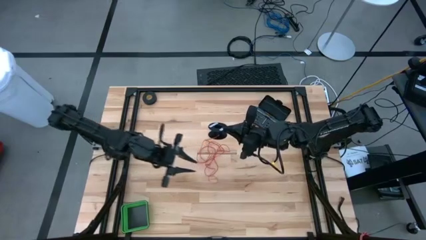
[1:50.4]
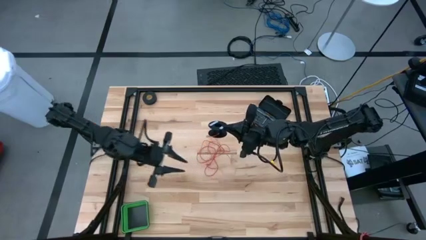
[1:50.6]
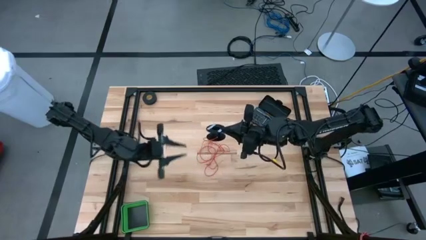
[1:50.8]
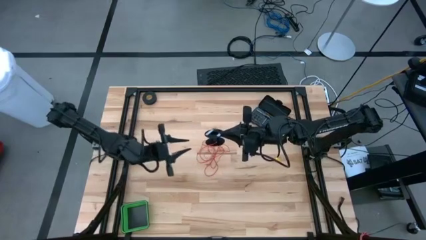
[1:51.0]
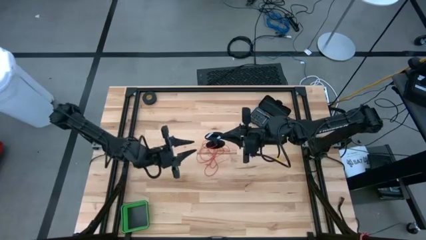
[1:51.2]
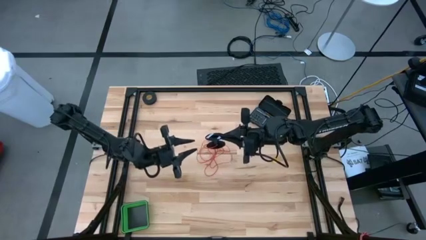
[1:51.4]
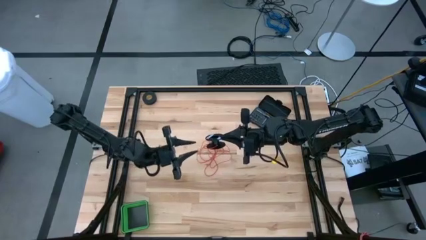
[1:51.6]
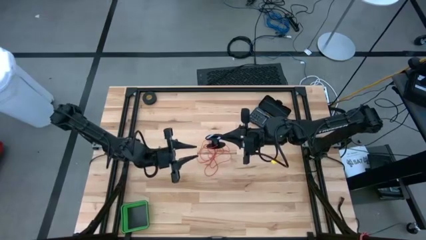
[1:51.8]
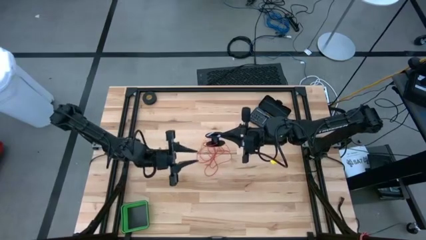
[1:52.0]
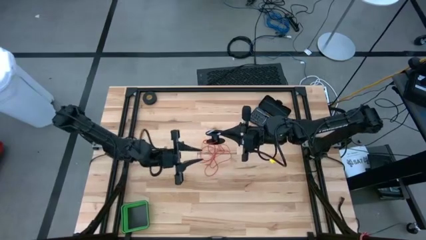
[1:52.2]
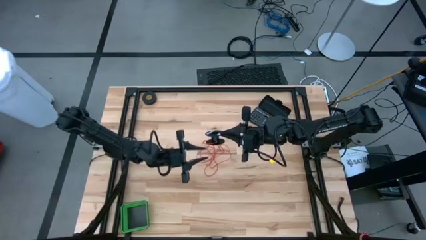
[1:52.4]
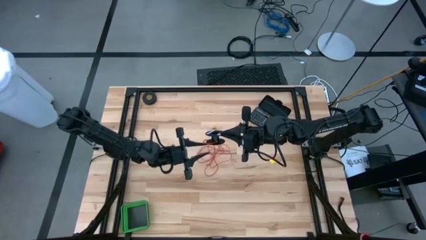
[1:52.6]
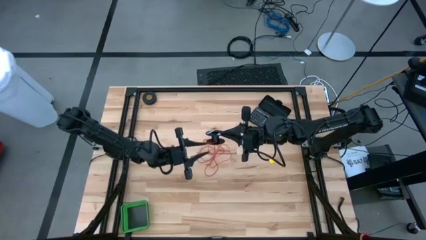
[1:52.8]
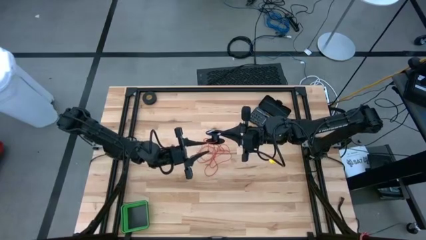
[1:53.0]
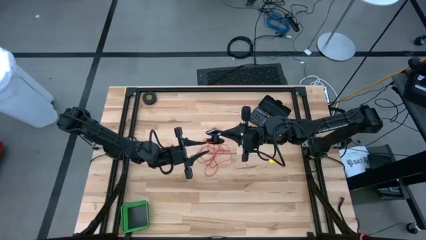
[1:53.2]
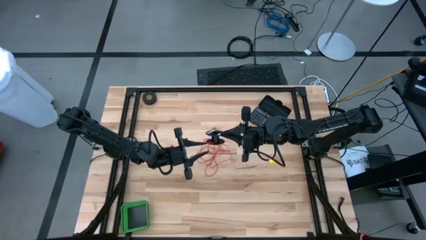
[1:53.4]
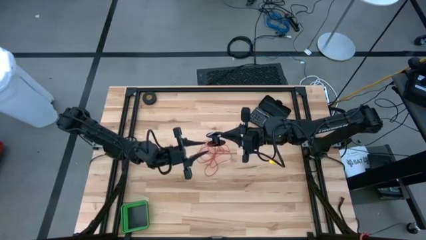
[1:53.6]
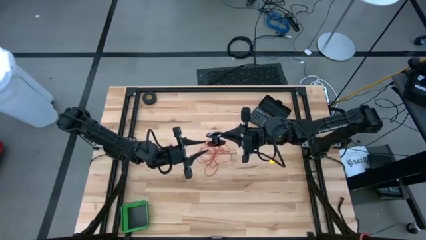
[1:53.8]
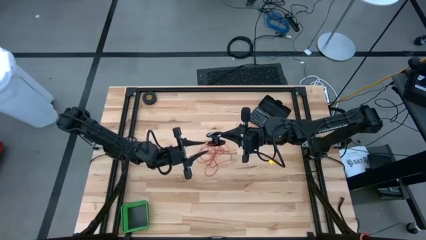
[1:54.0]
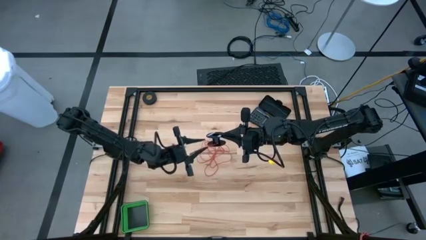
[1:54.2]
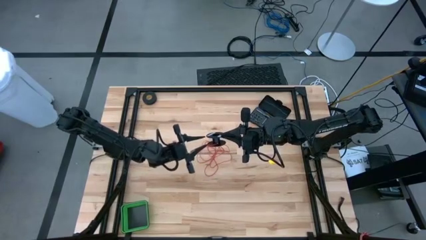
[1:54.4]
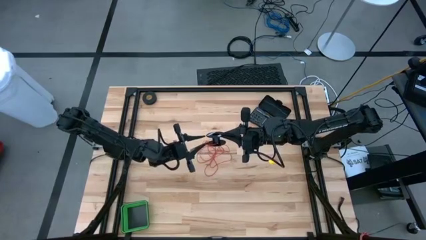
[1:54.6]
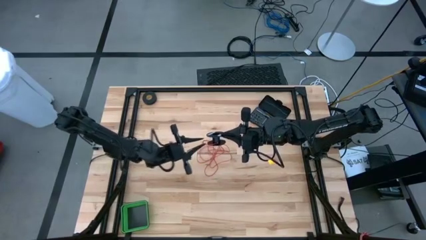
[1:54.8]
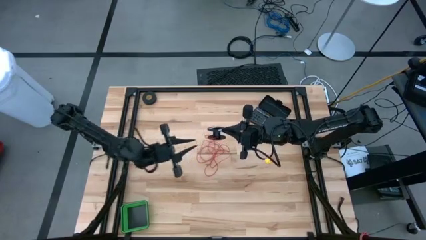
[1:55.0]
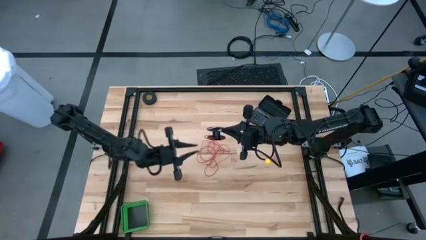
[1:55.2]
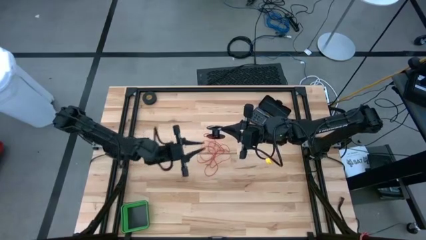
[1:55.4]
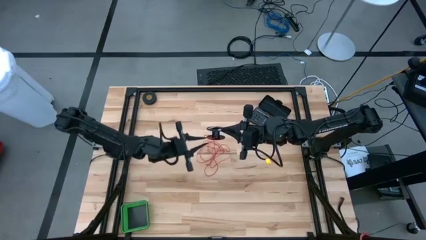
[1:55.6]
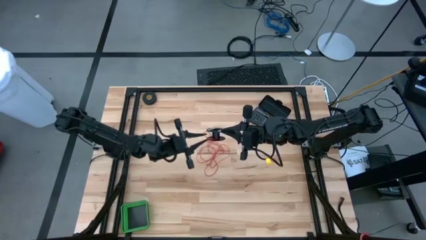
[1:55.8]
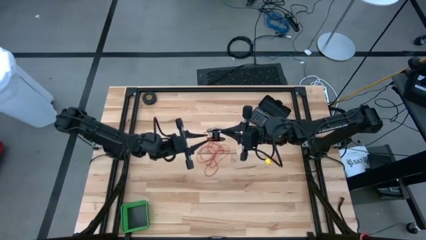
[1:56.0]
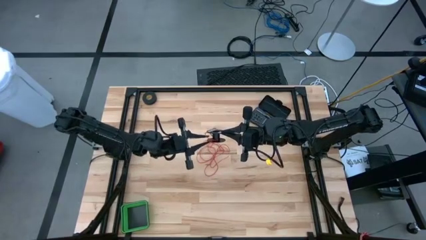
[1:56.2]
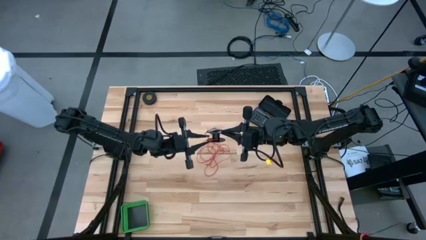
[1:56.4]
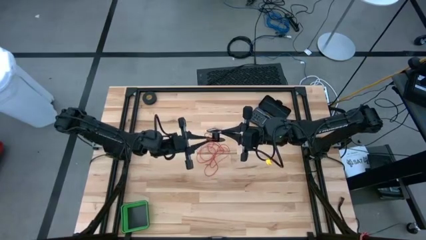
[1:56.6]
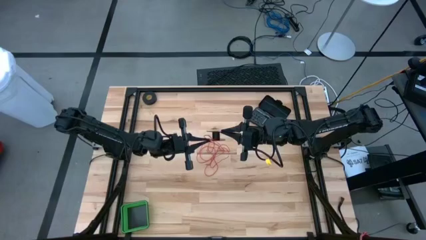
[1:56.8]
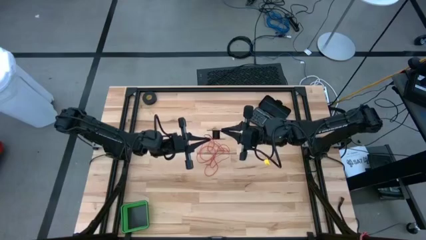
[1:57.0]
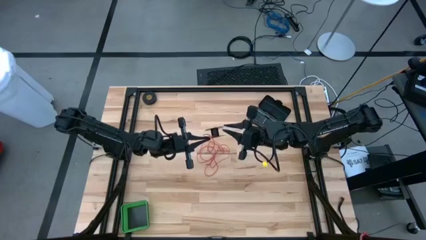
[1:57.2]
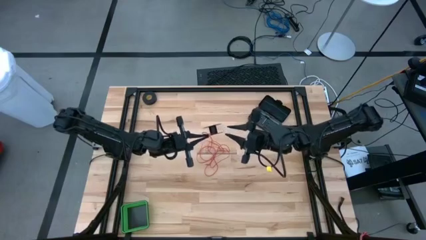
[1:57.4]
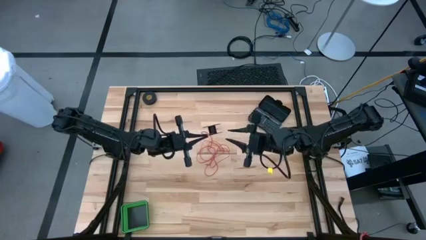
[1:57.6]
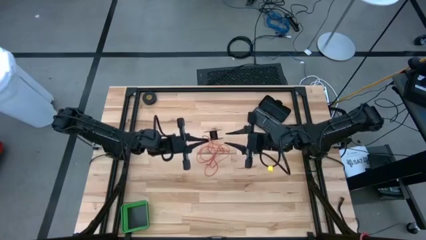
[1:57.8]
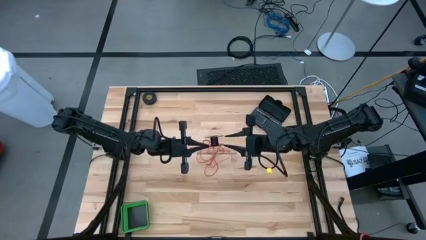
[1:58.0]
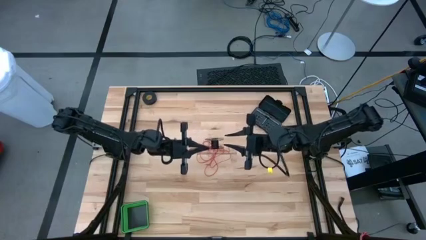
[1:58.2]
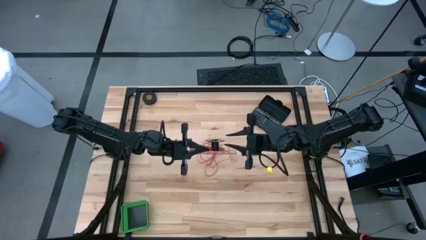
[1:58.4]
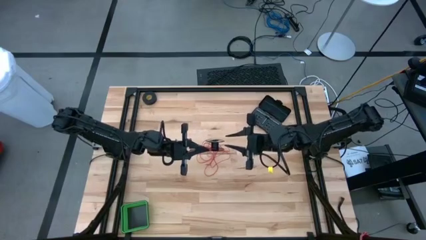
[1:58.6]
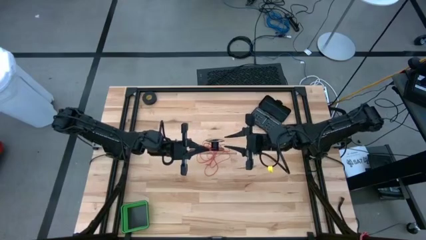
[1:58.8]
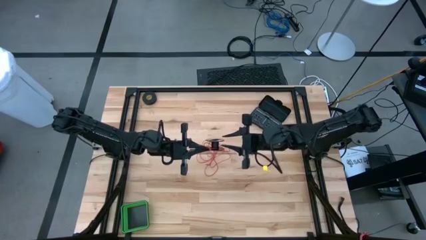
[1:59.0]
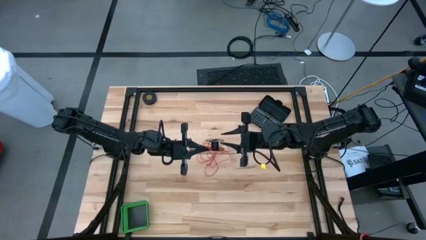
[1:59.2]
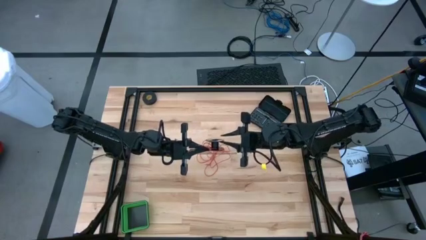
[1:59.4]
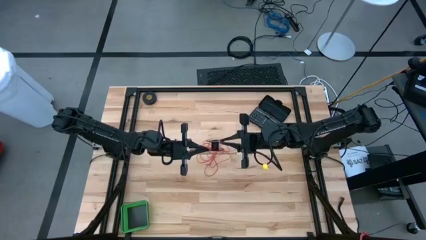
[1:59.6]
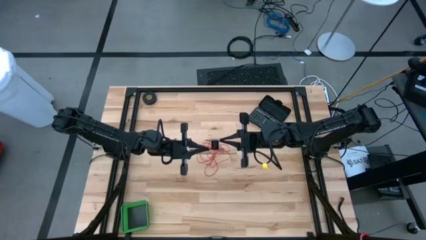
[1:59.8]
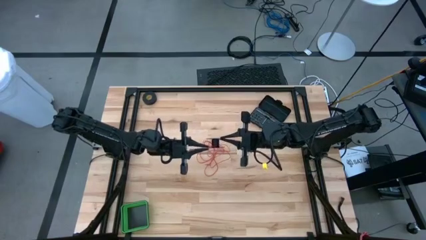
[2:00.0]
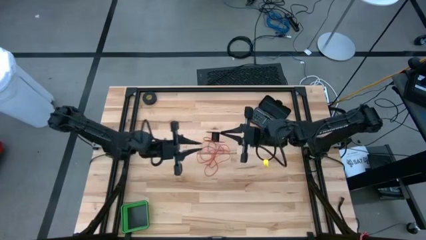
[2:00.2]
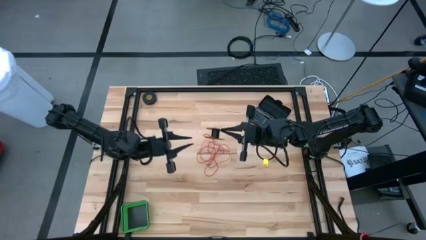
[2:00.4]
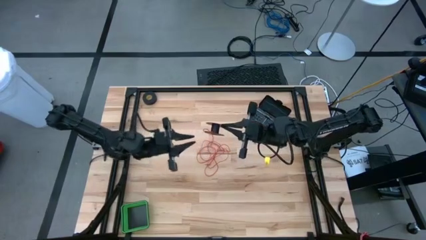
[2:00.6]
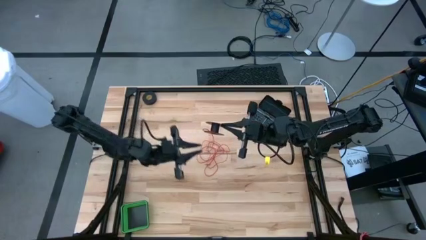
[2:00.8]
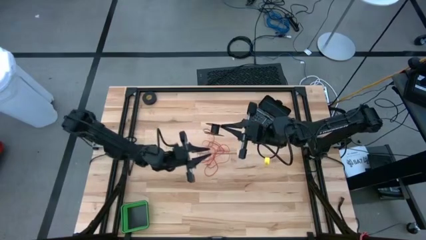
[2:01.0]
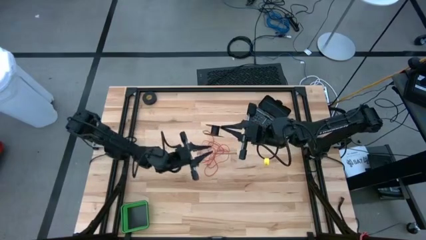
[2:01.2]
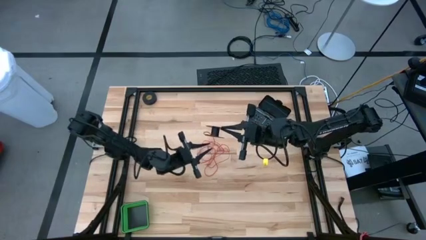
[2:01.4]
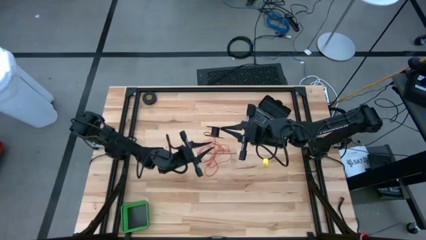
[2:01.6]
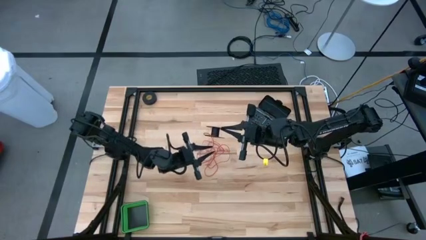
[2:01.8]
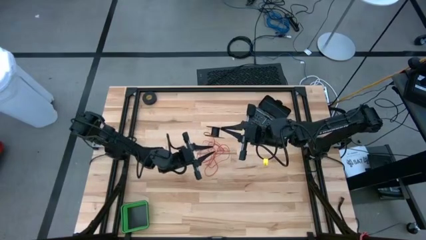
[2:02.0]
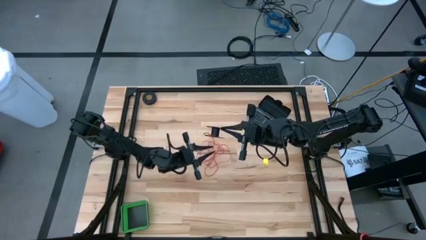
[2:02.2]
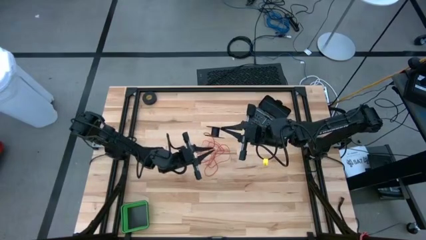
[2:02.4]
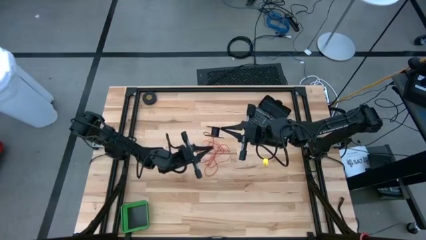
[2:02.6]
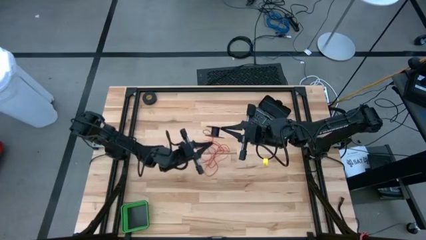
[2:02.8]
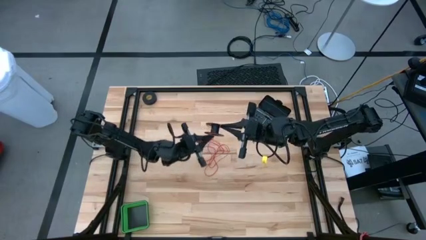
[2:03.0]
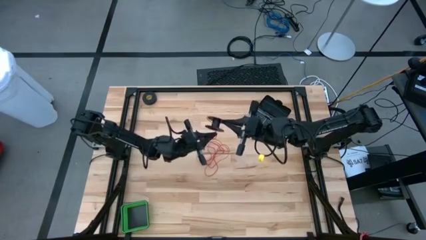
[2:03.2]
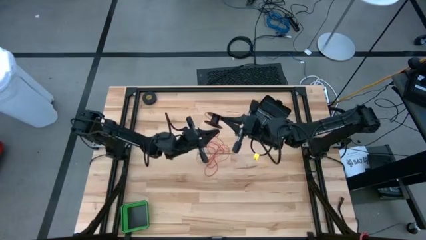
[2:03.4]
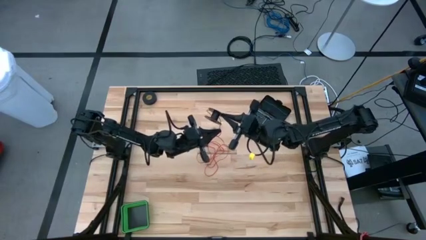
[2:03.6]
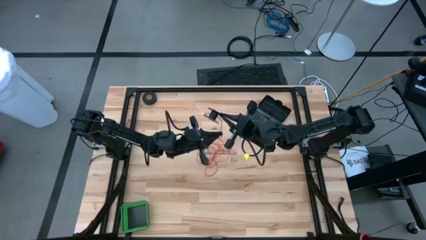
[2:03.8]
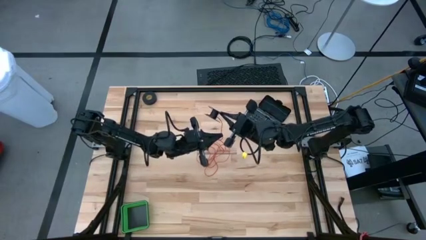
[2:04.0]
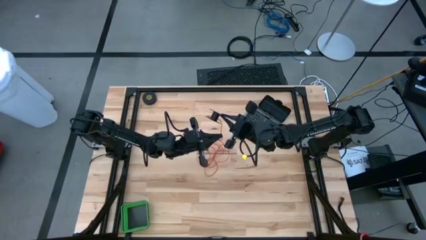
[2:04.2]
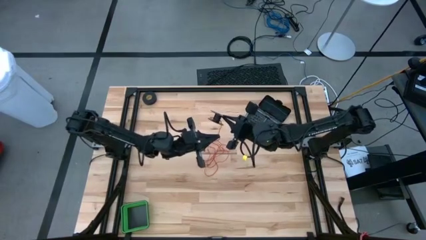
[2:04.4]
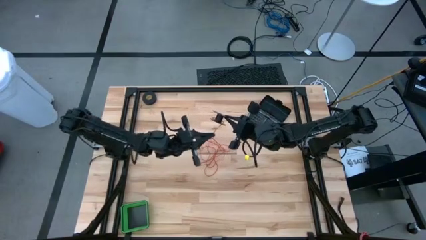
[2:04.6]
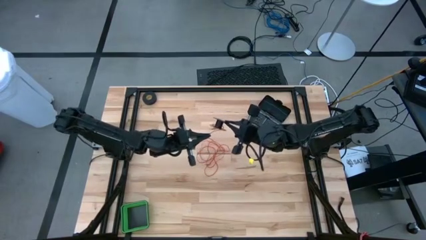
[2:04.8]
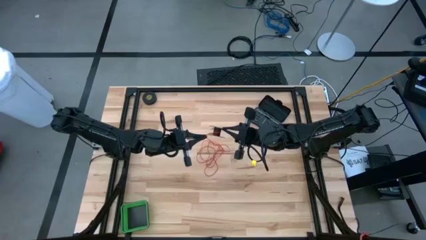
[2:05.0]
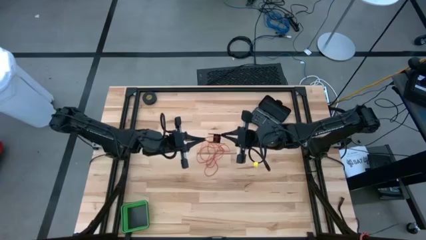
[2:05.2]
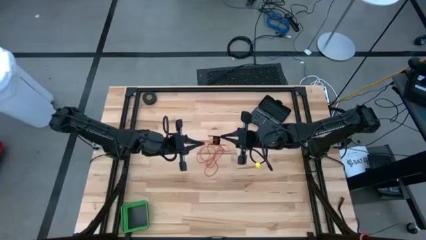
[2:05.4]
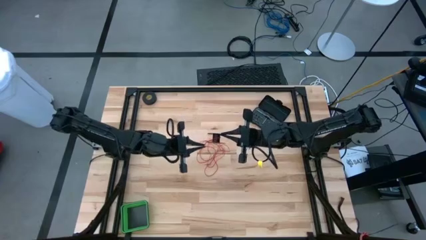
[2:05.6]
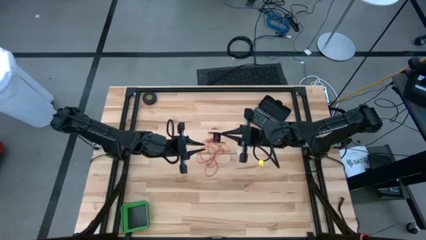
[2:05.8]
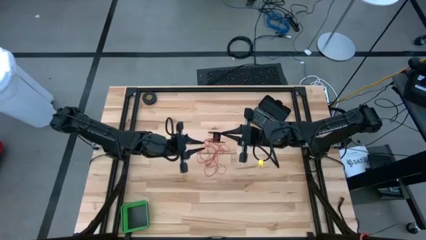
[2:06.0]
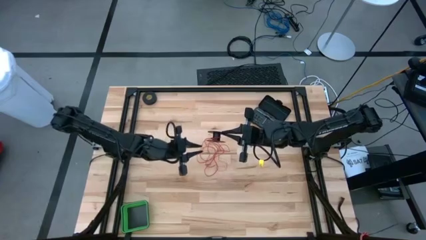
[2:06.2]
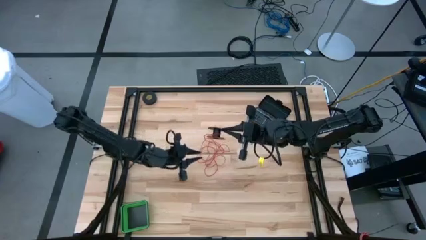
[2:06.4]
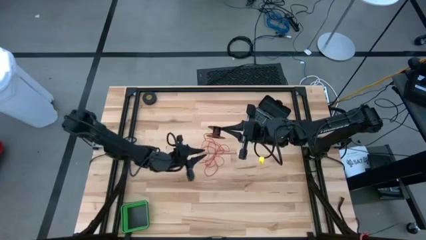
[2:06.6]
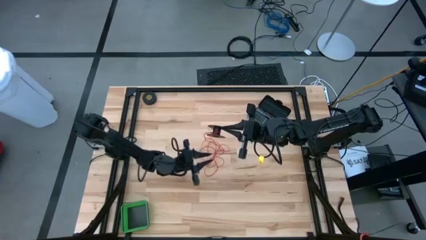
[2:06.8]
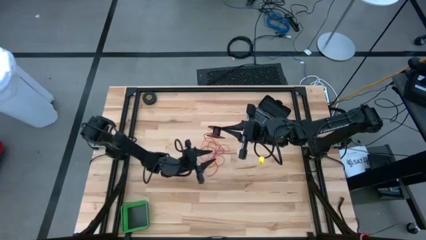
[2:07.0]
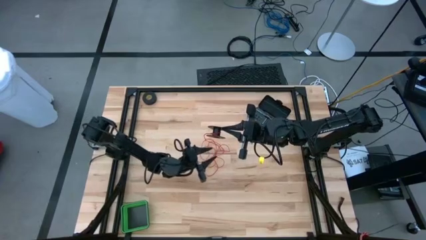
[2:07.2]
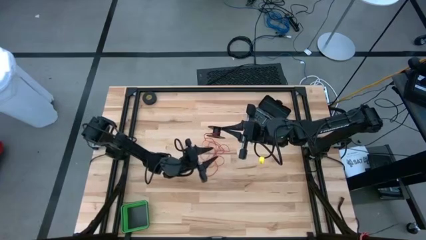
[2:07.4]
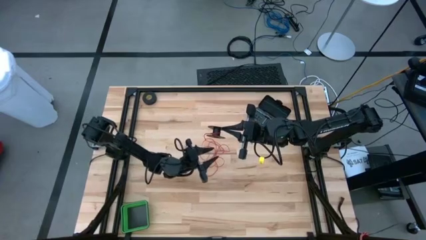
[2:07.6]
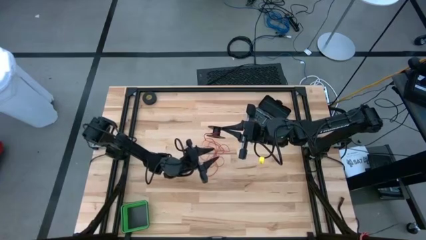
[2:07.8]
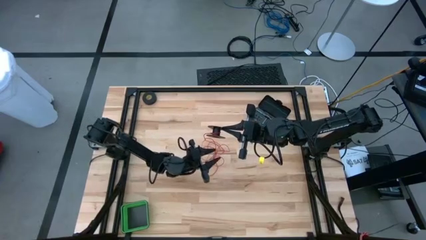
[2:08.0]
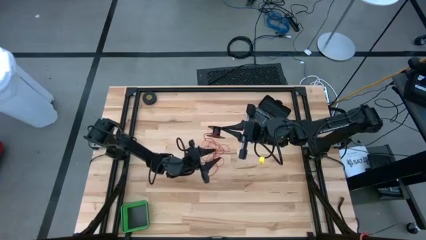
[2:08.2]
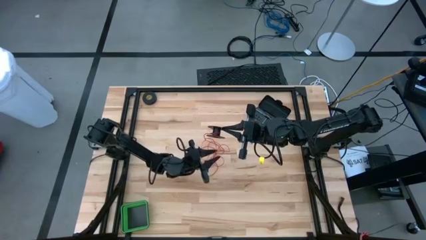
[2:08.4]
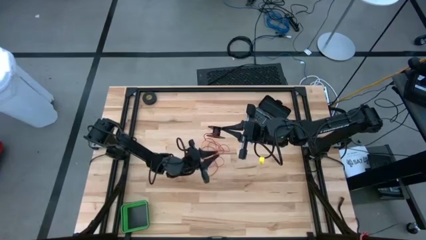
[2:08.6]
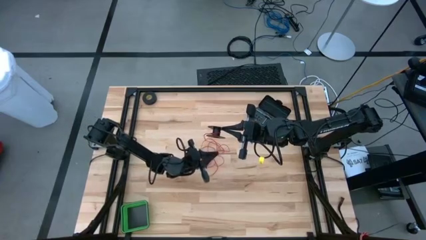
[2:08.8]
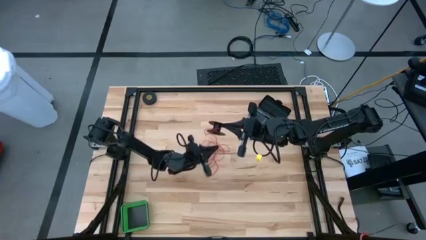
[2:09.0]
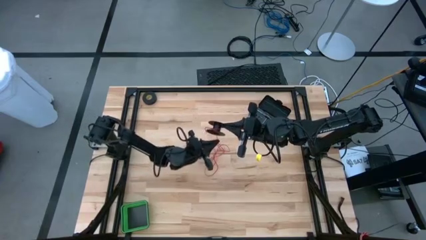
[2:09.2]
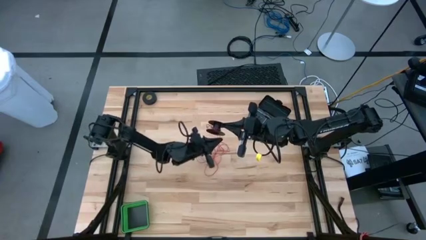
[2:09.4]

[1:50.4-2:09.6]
Task: Coil cords
Coil the red wire into the spool
